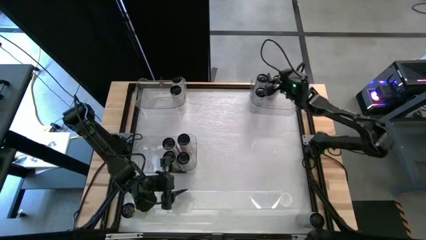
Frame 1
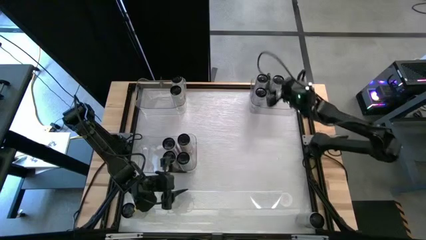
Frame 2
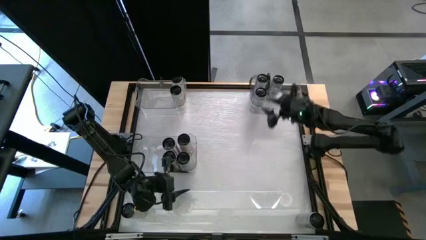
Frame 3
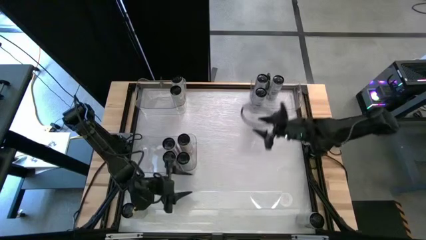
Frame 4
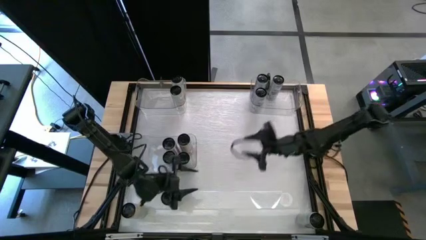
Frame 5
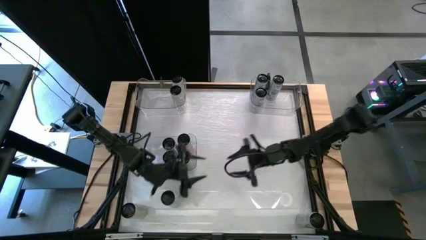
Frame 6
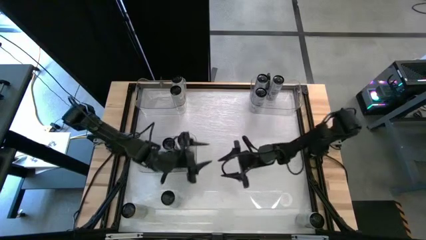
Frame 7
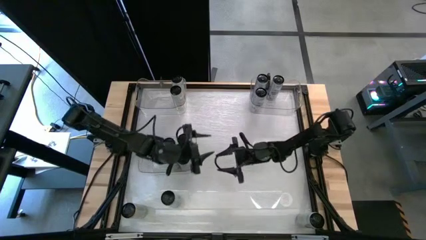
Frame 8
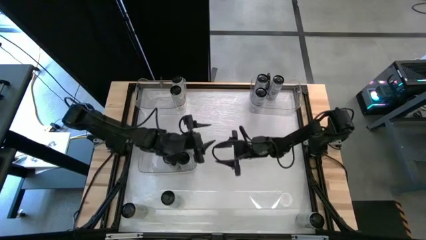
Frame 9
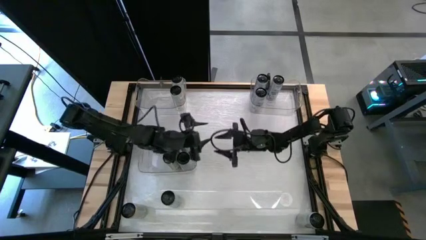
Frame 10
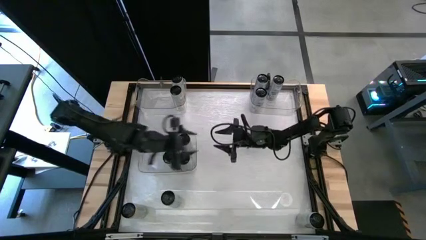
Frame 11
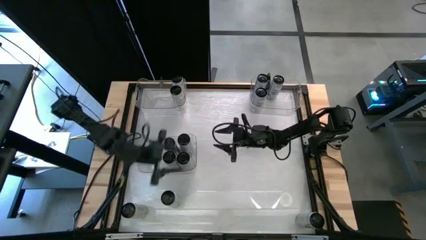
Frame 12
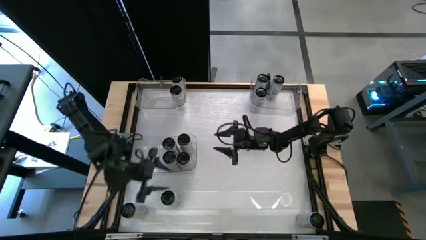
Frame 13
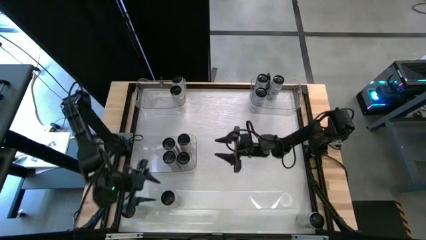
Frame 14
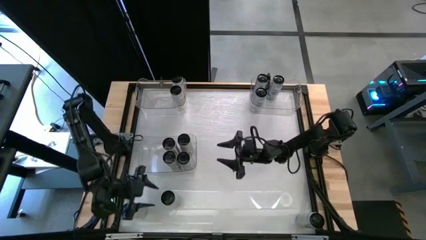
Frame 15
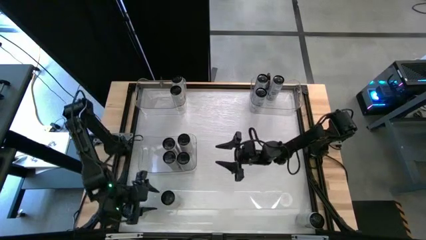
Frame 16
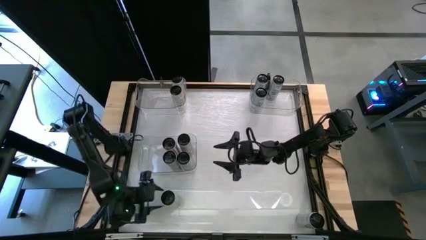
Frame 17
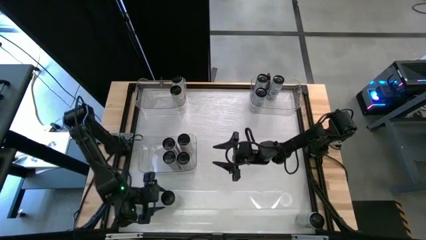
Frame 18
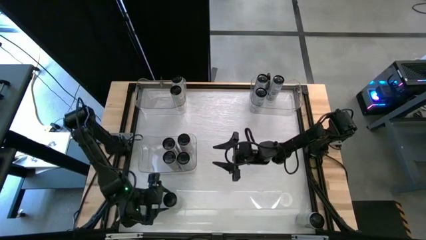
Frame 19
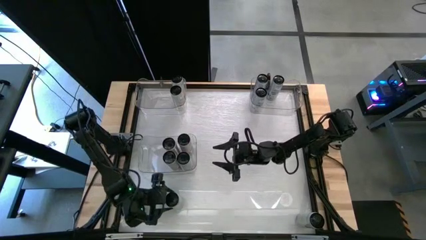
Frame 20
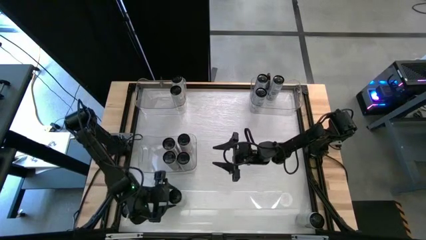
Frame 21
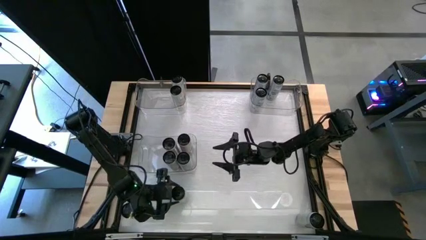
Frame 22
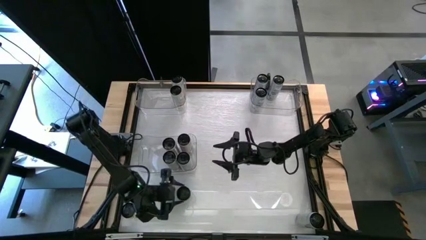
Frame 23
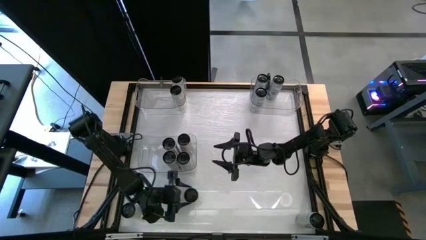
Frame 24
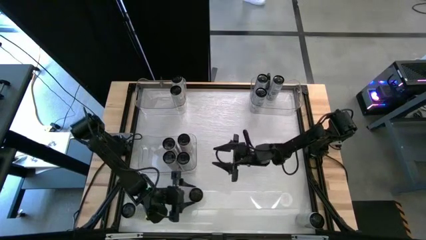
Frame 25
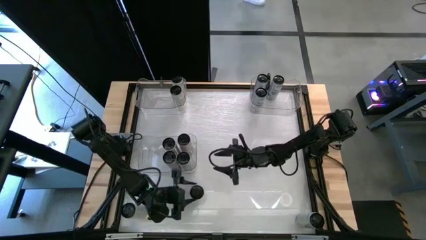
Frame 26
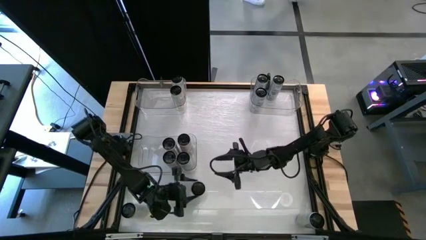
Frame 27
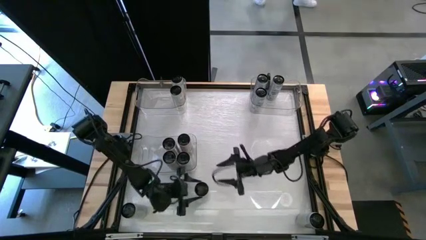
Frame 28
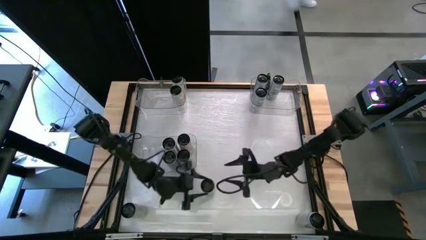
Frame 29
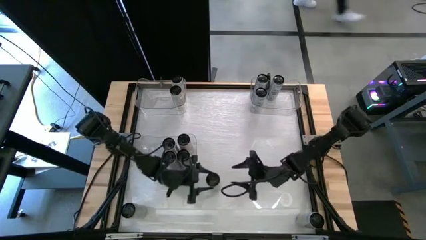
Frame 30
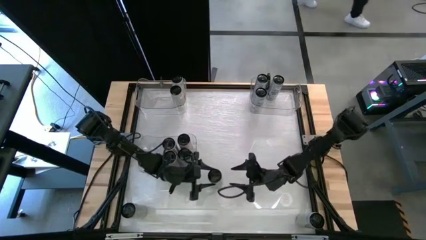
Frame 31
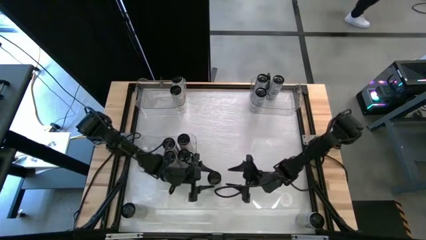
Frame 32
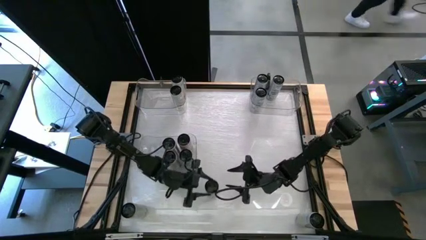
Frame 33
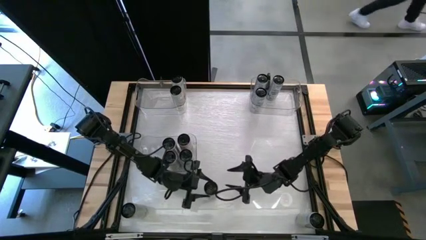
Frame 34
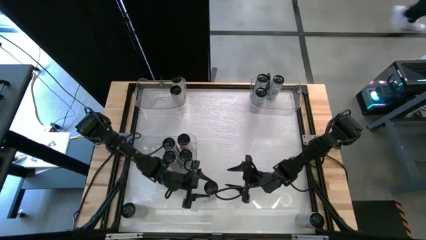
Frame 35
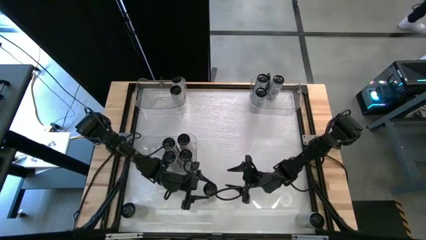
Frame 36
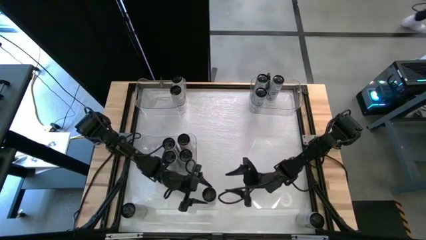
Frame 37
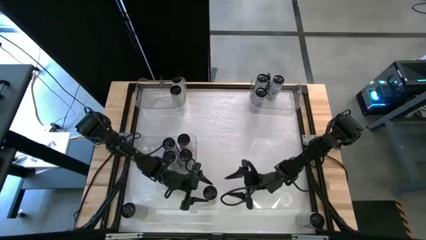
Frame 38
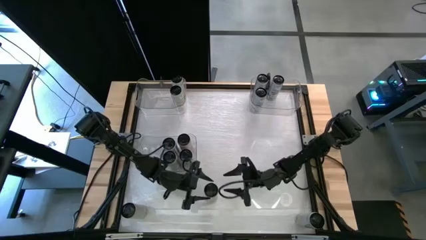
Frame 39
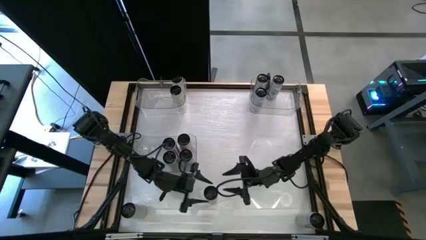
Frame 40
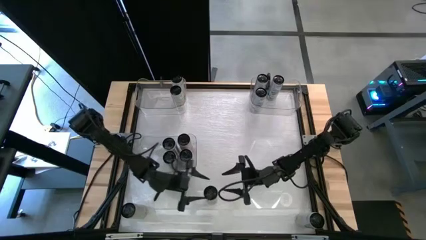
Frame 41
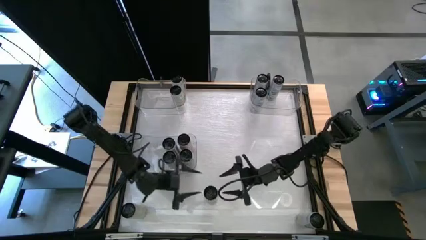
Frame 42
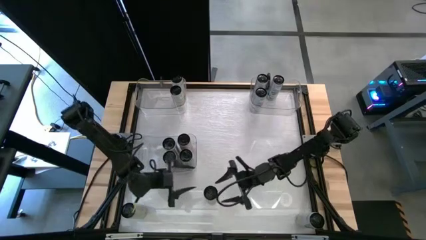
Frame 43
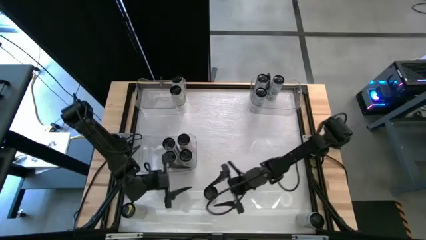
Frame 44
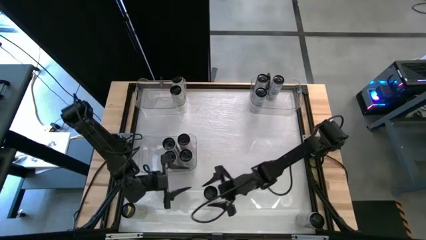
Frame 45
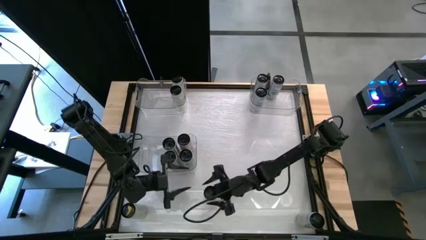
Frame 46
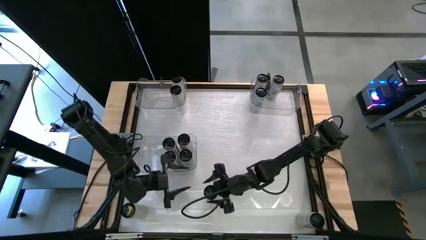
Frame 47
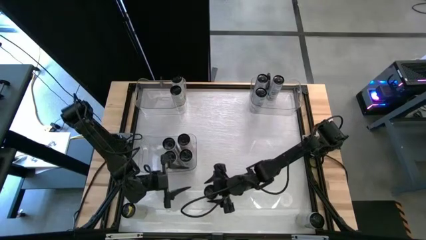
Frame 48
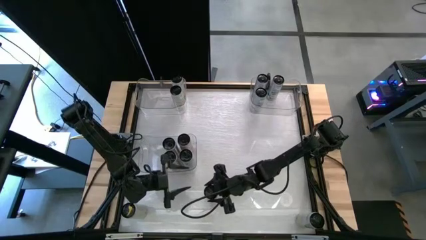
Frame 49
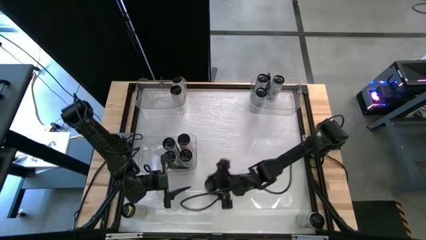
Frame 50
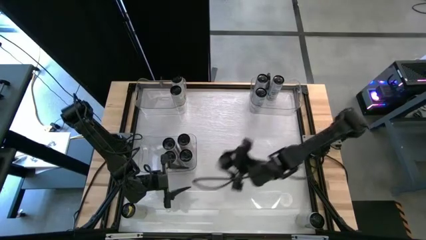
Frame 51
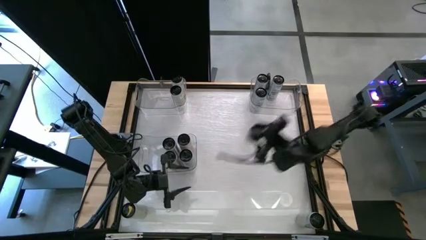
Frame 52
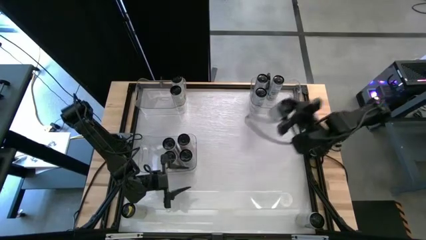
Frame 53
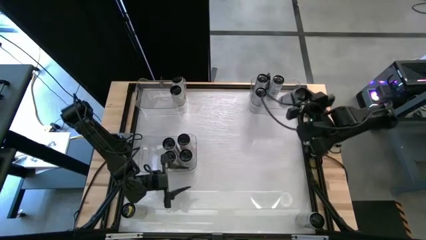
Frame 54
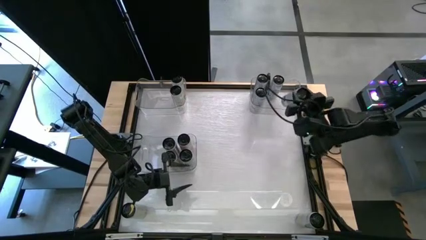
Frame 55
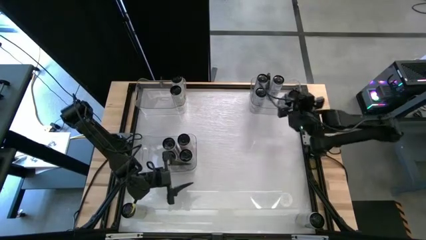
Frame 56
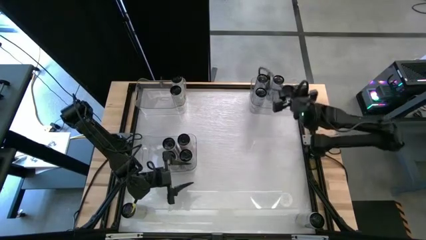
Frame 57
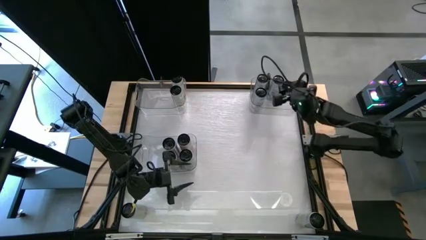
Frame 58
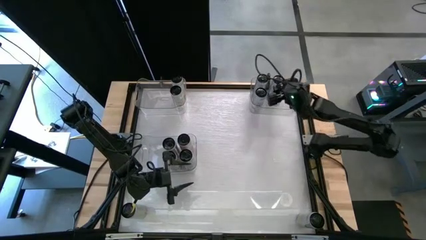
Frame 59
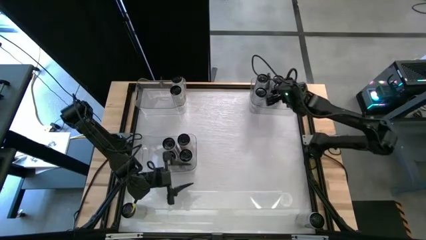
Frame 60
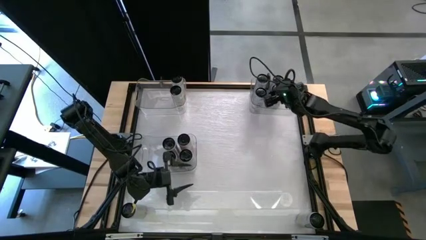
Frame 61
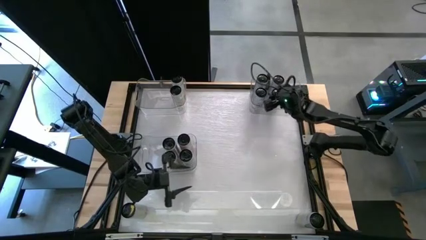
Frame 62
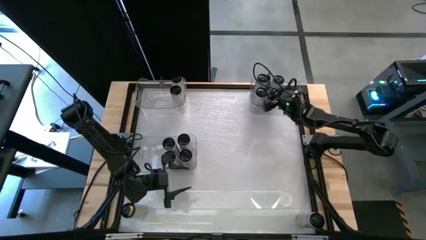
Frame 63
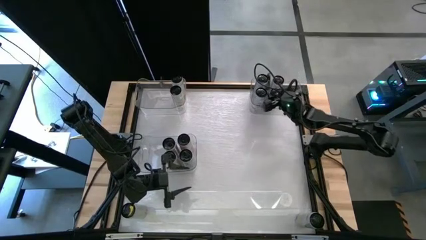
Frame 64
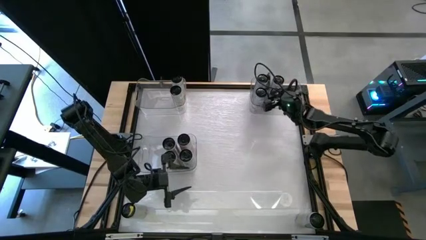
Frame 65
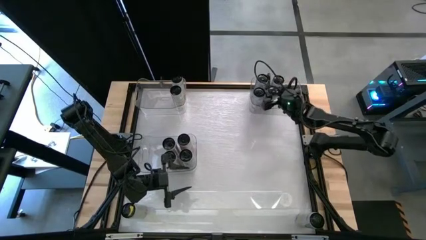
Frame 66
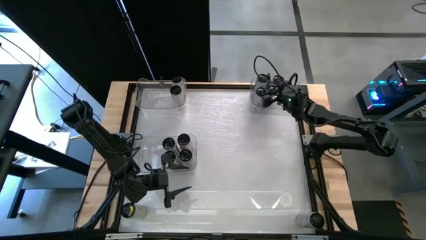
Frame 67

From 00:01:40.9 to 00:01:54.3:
Task: Sort soda cans
Put the white-blue can into the top right transparent bin

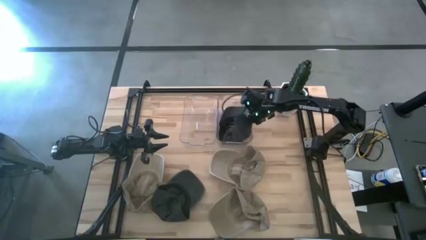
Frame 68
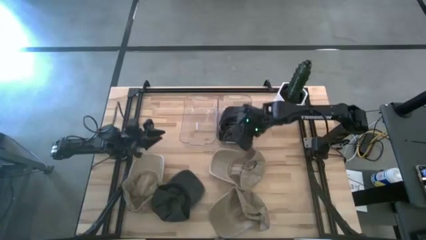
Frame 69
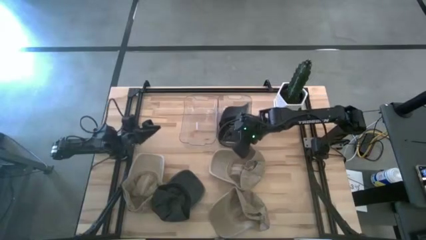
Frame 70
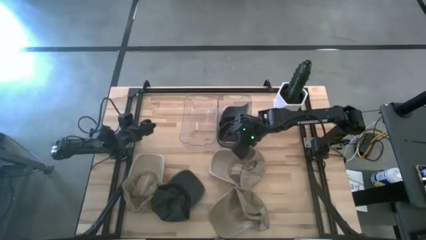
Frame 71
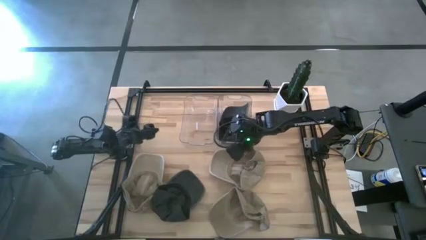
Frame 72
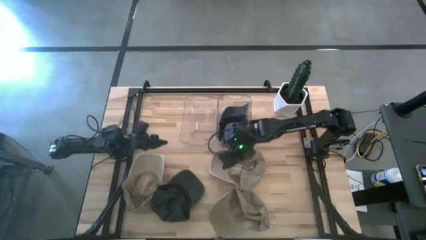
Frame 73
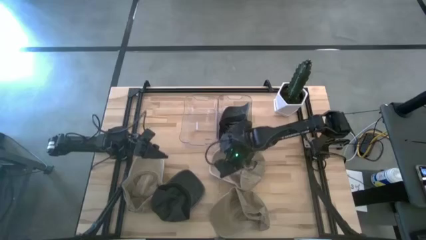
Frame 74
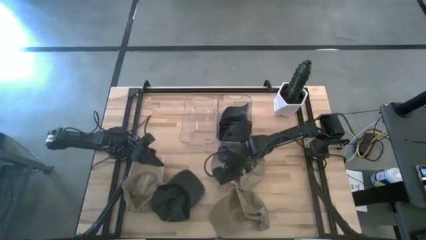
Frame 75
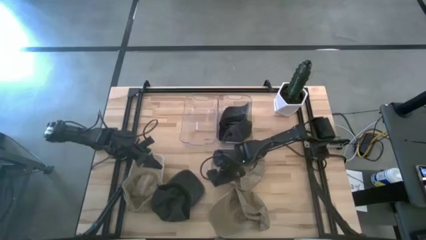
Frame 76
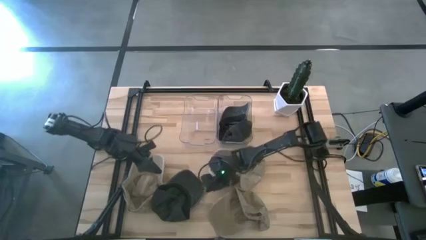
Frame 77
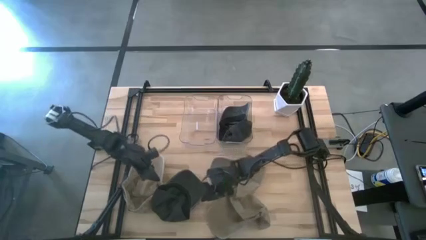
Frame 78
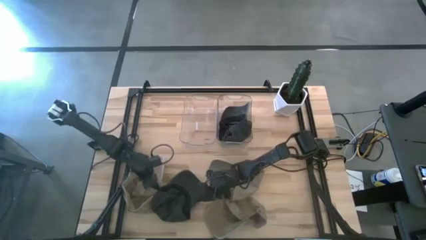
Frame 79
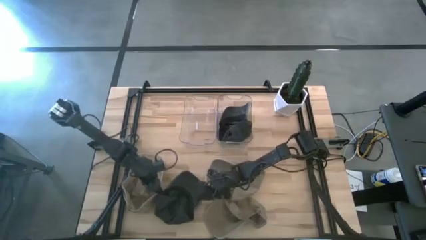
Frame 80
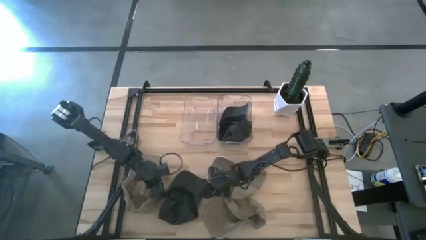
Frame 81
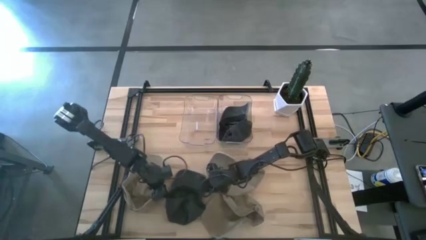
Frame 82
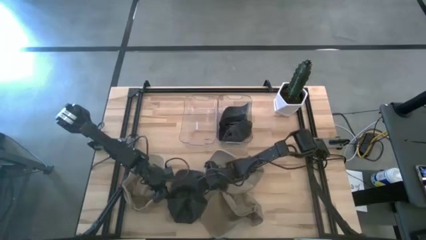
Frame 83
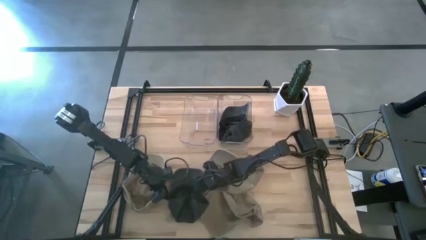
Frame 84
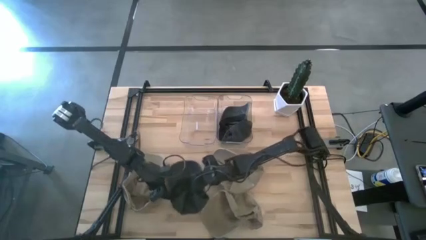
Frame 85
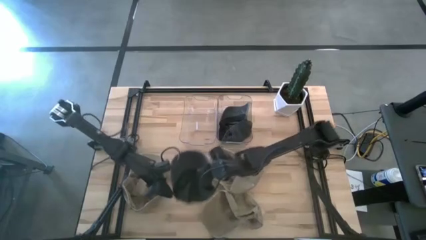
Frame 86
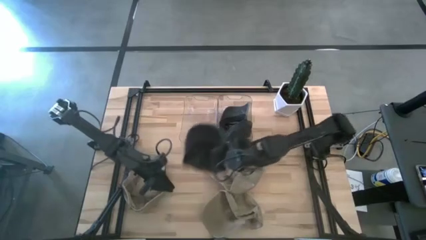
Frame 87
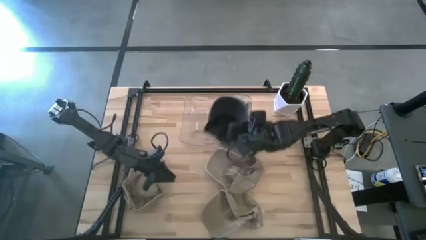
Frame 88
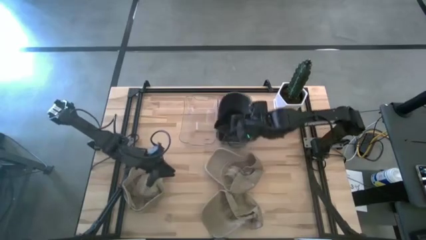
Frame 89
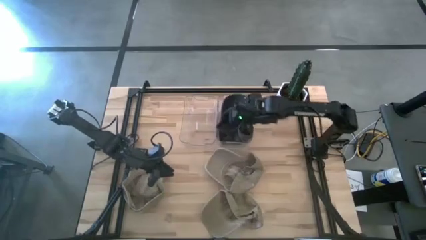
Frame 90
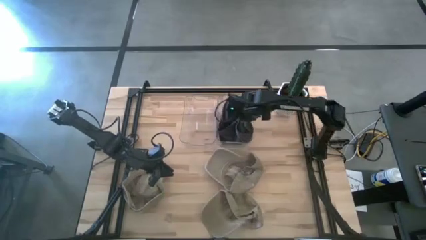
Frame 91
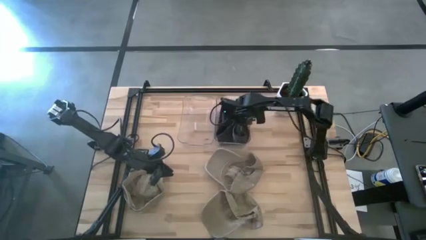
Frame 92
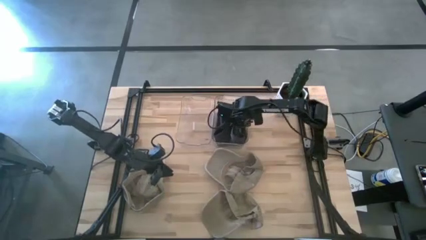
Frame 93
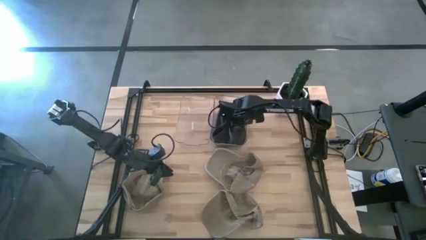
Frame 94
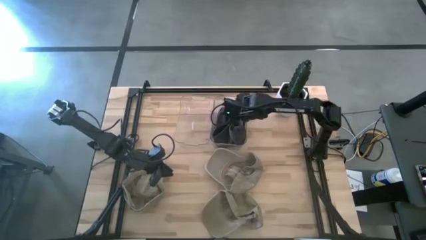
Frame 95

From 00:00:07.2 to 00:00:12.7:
Task: Pick & Place hat
Put the black cap into the right transparent bin
